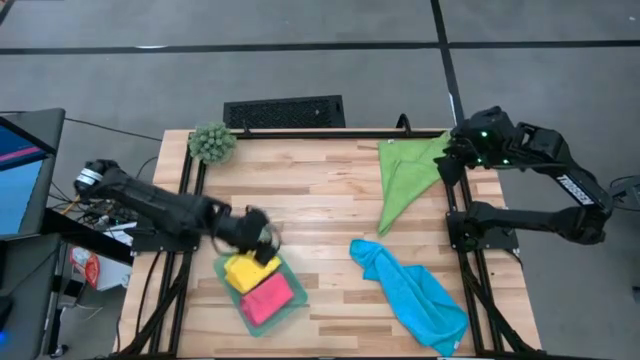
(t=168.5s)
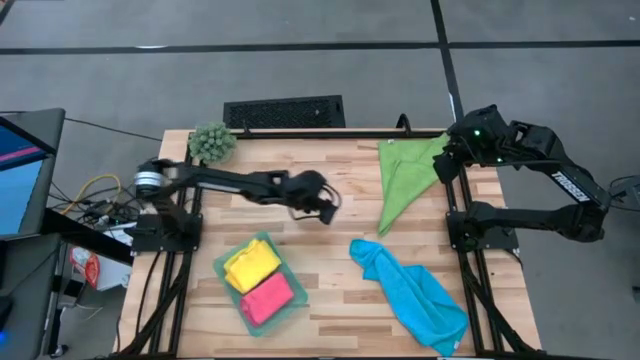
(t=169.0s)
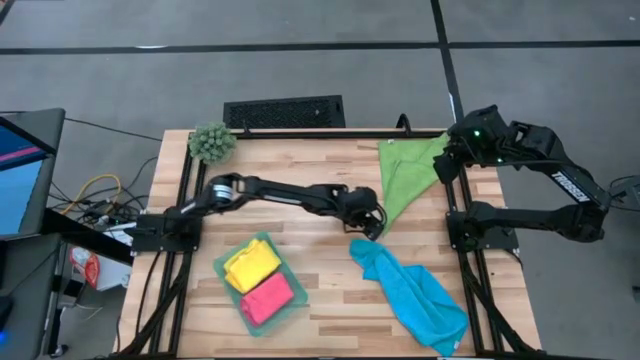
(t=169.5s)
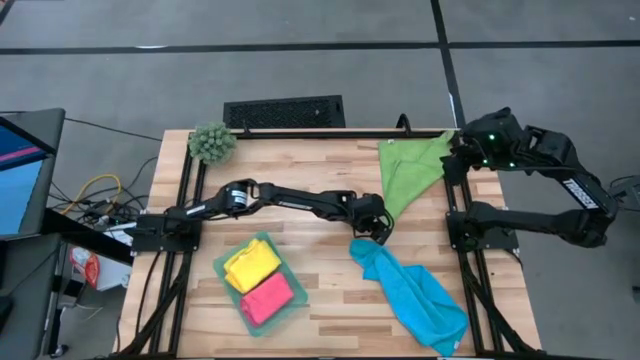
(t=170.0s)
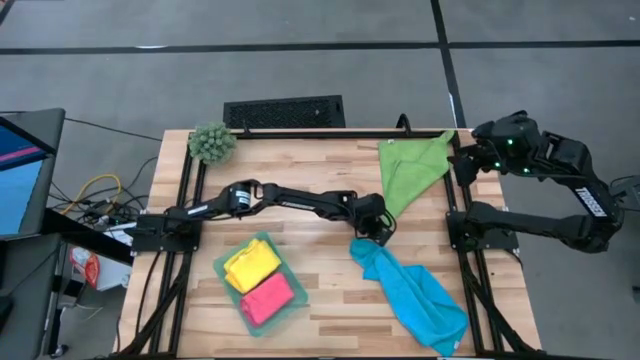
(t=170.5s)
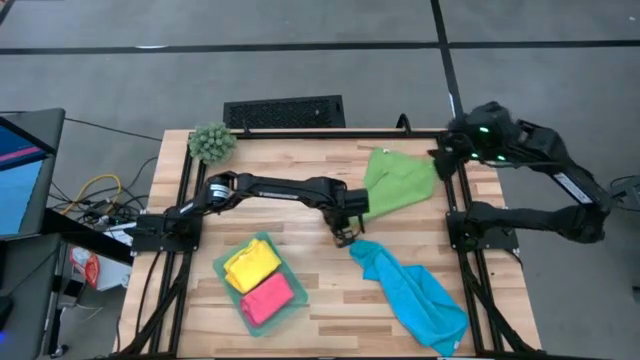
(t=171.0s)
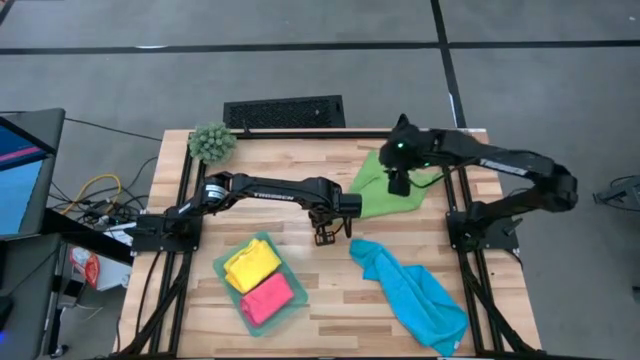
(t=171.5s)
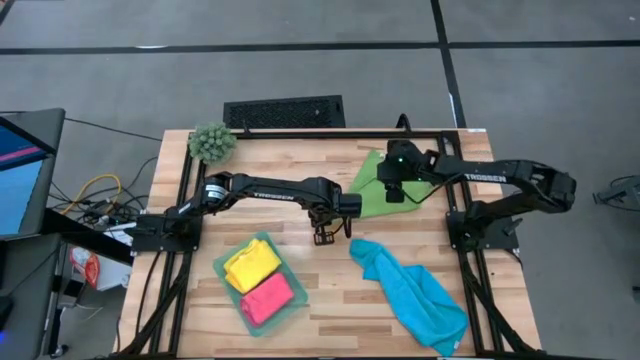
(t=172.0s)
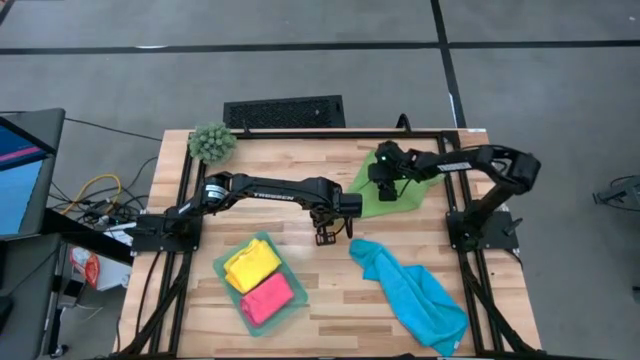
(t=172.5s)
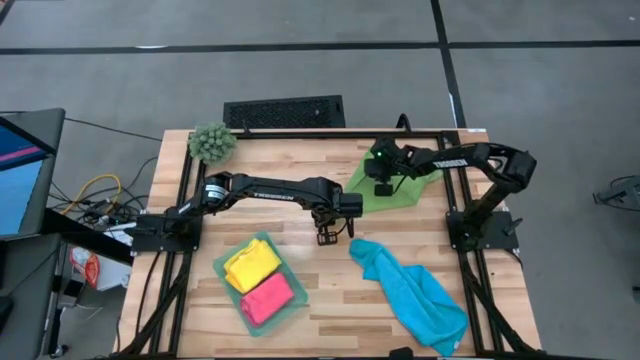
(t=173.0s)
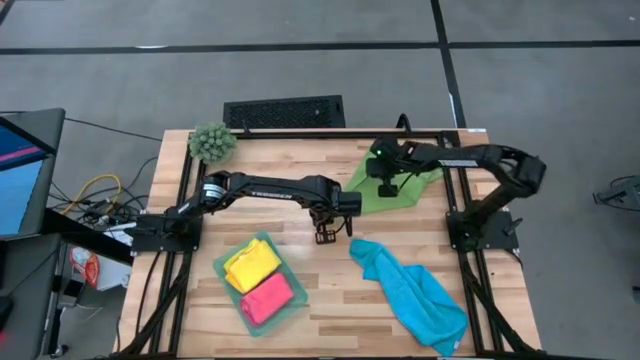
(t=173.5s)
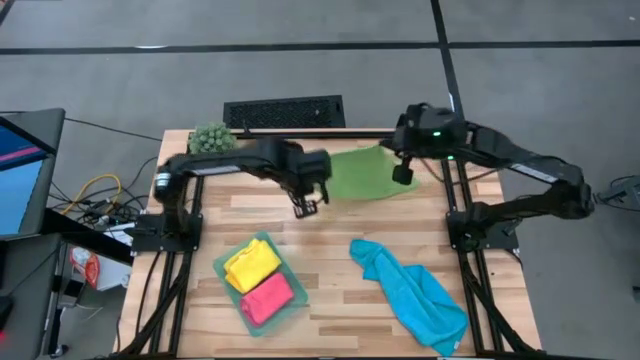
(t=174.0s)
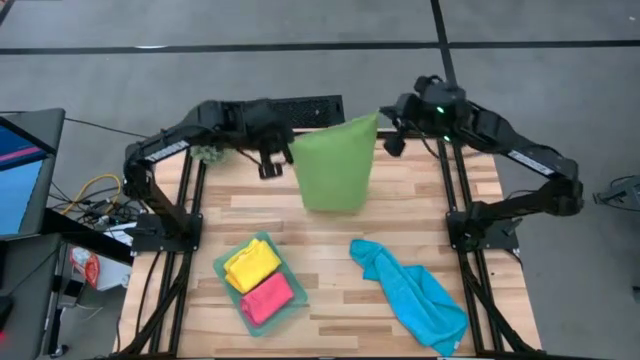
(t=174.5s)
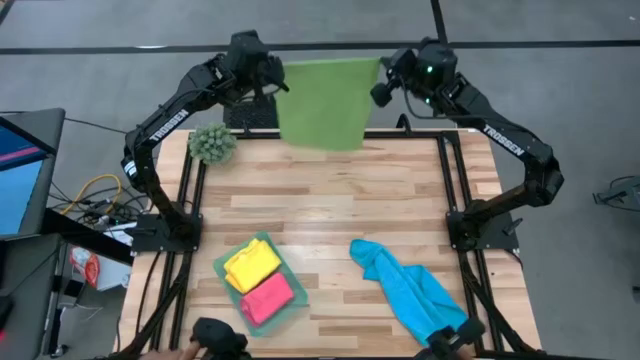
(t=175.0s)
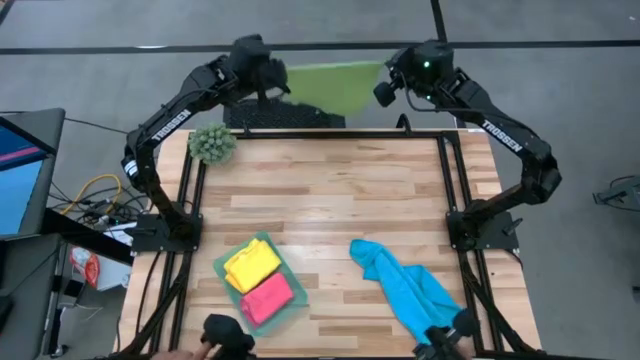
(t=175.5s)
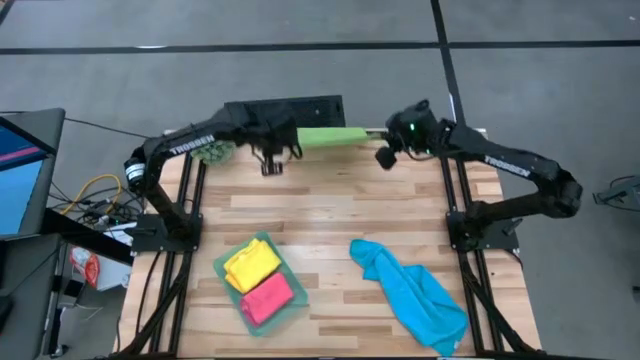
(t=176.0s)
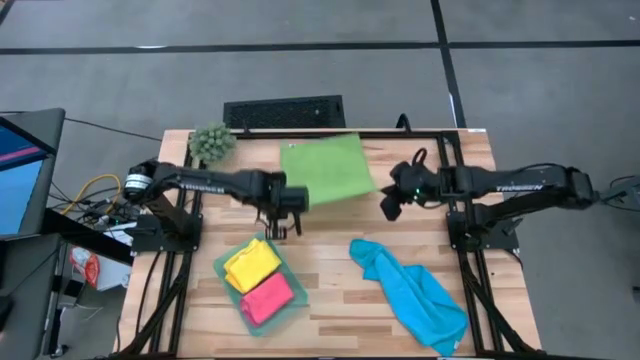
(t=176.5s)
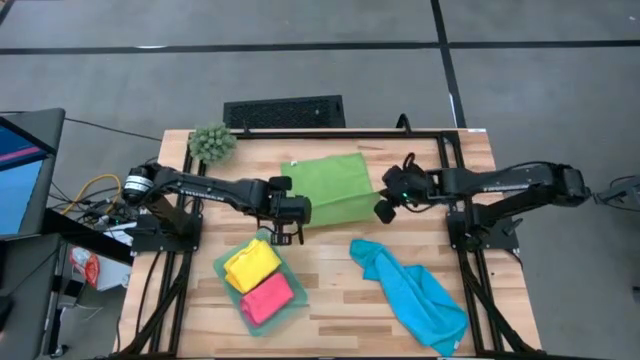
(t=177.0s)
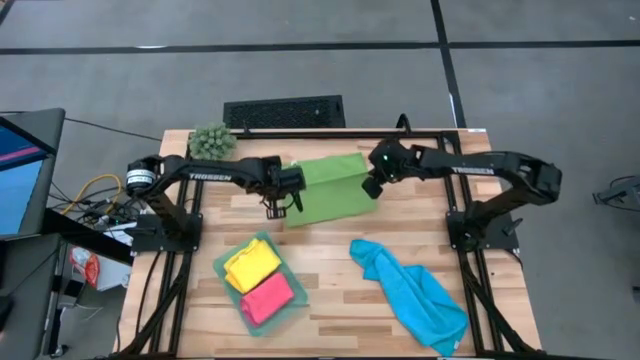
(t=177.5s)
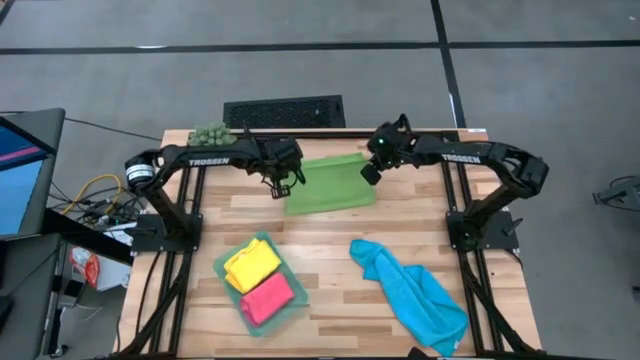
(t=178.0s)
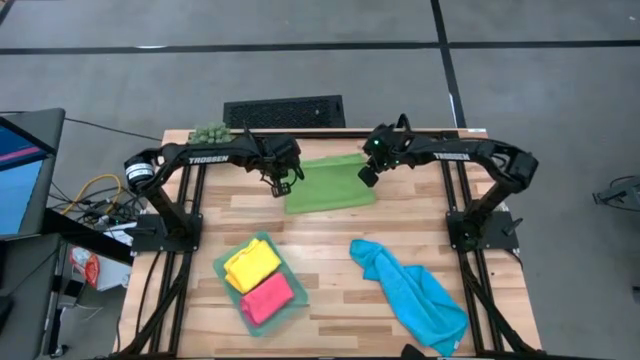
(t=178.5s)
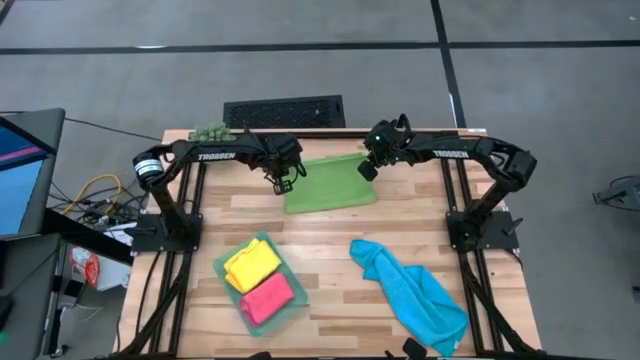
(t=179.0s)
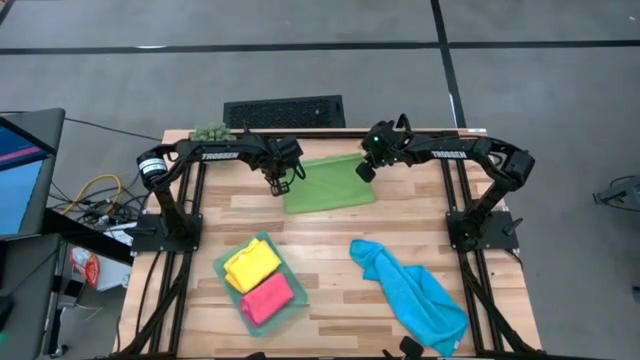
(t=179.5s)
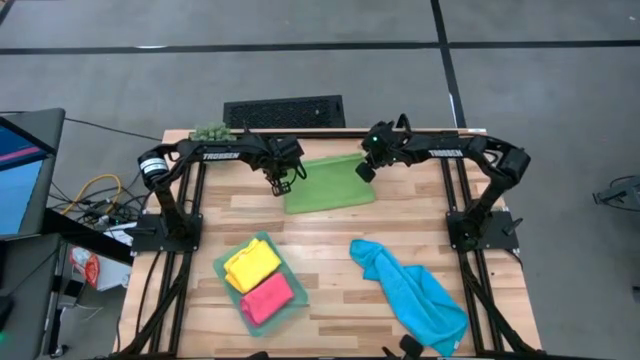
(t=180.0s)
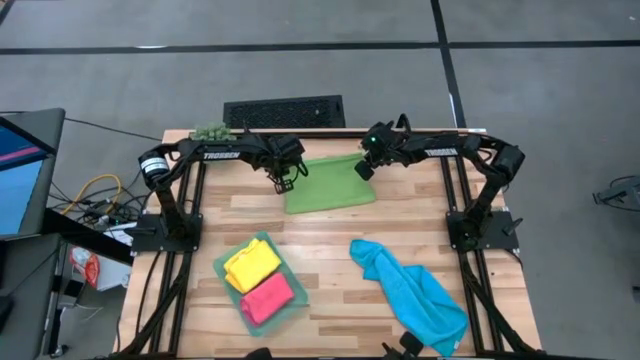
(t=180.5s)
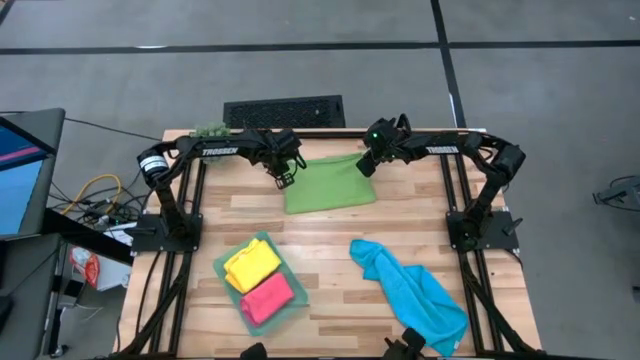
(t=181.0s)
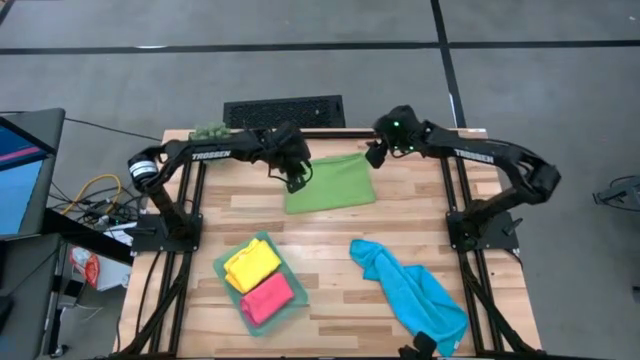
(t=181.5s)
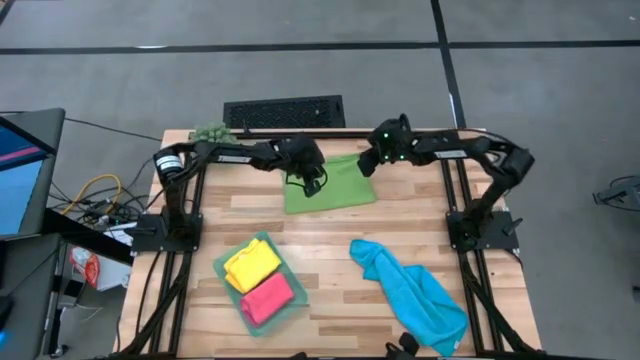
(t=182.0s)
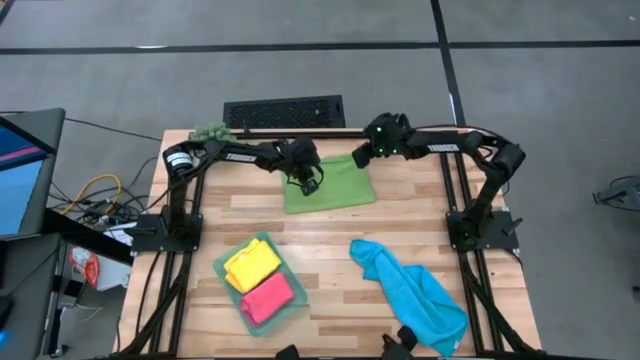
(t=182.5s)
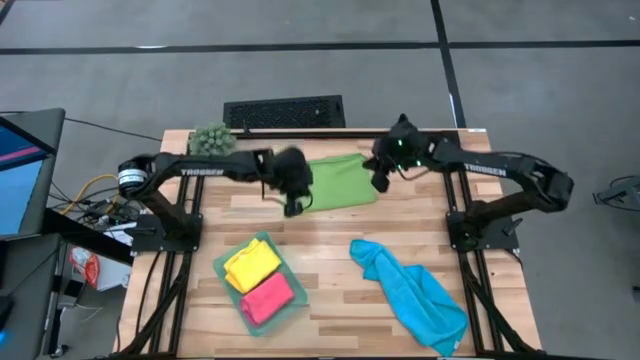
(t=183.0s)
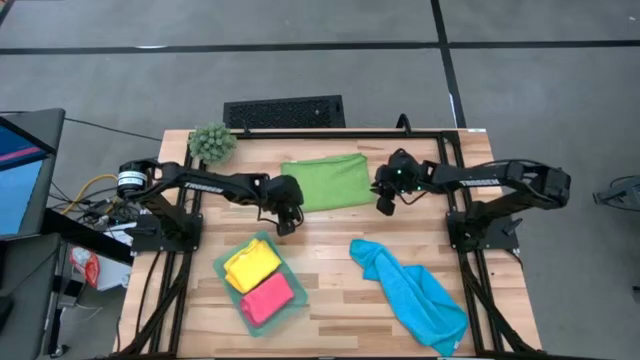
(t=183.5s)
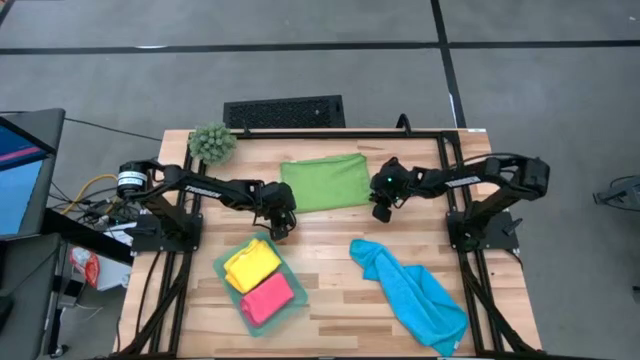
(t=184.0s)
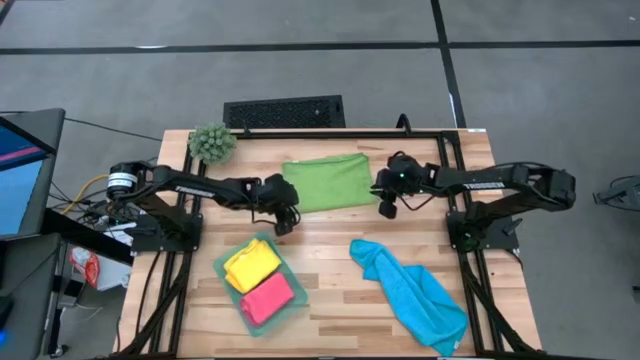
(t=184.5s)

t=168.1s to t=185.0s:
Task: Fold microfiber towels
Fold the green towel
